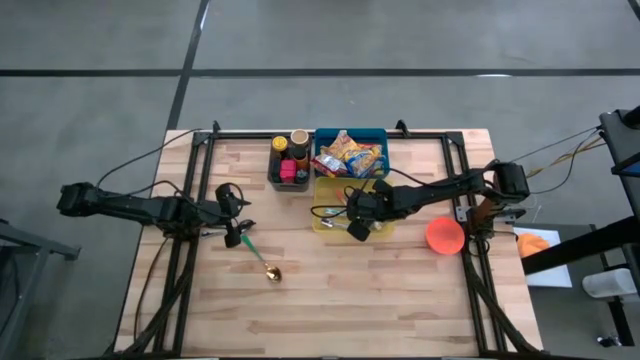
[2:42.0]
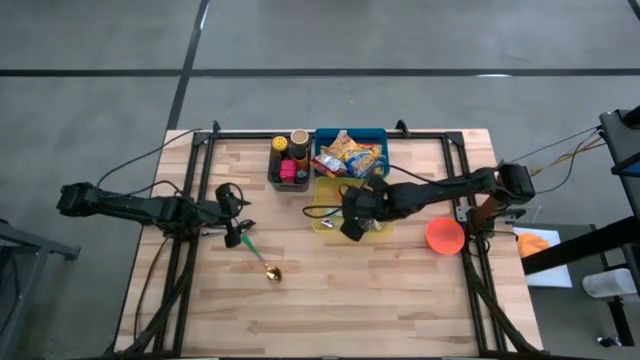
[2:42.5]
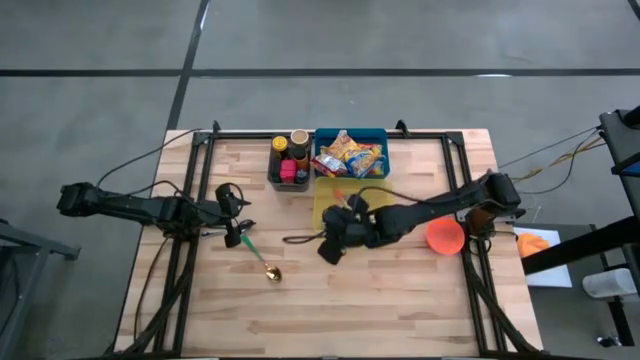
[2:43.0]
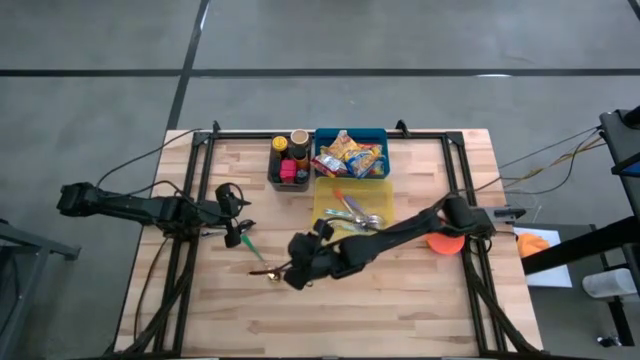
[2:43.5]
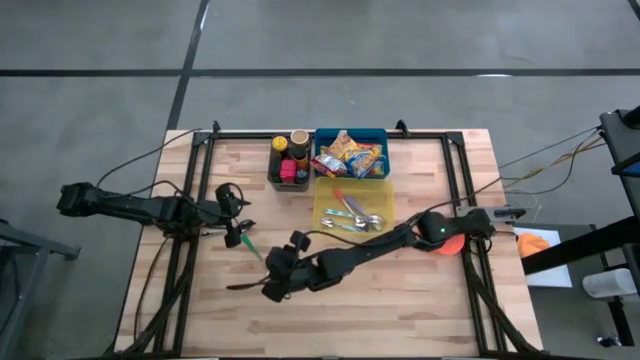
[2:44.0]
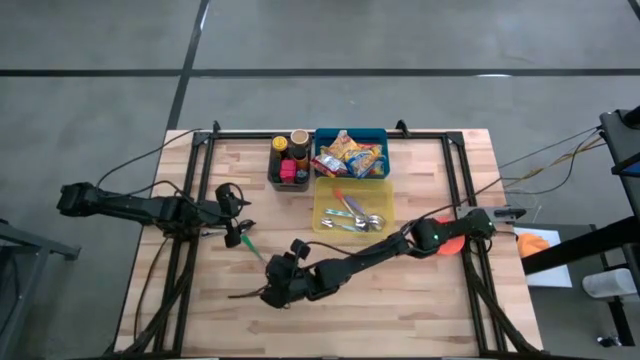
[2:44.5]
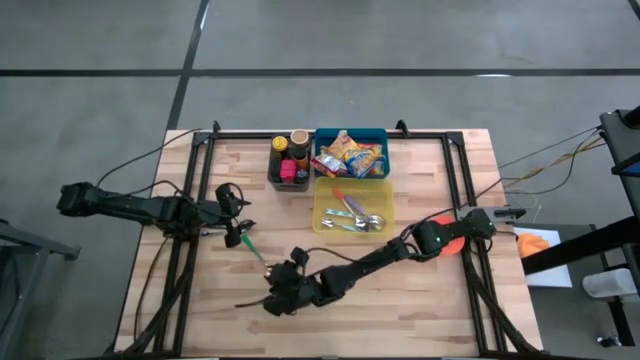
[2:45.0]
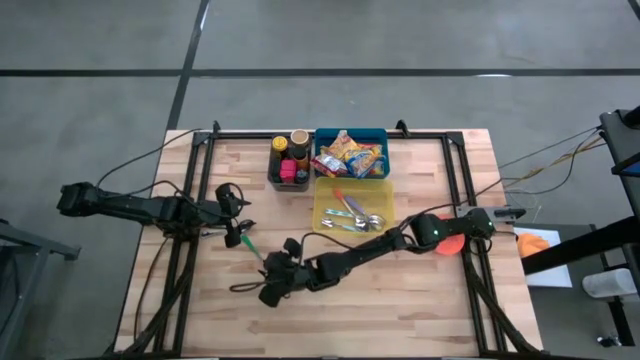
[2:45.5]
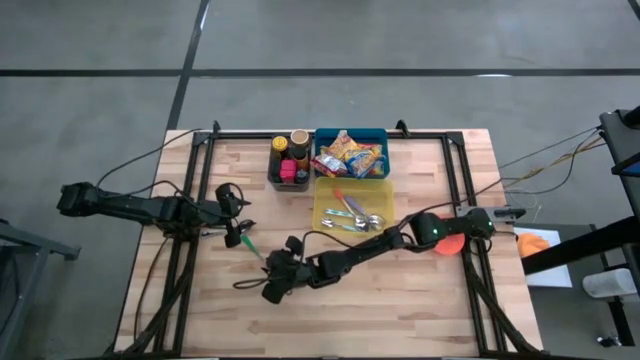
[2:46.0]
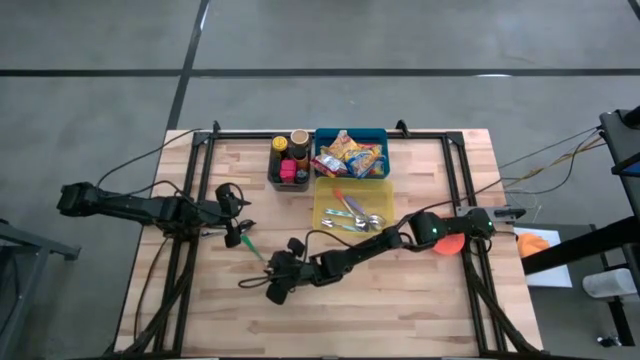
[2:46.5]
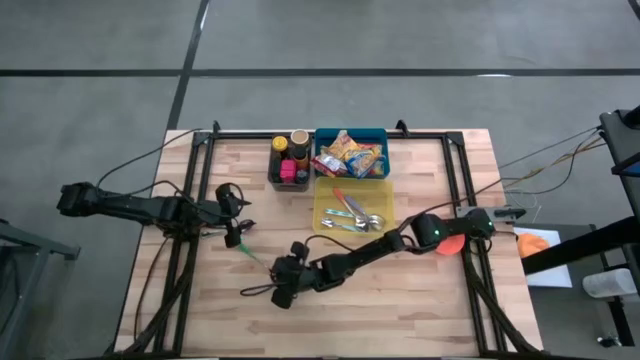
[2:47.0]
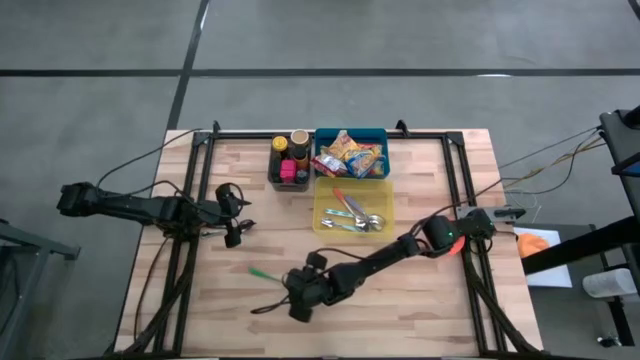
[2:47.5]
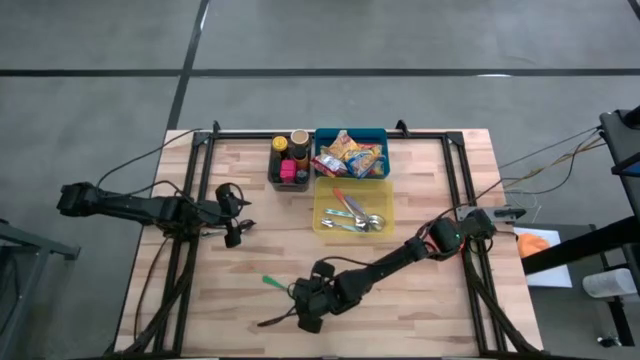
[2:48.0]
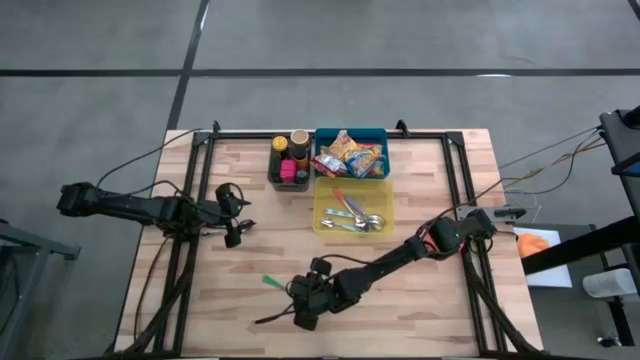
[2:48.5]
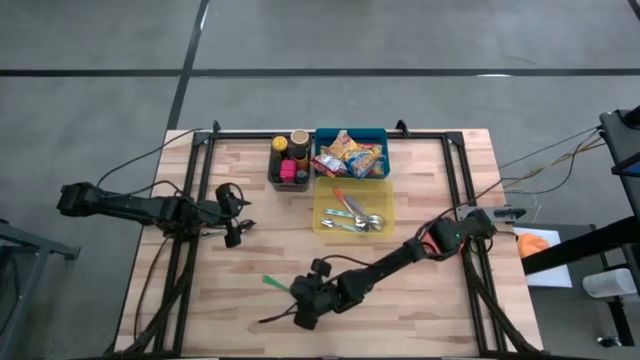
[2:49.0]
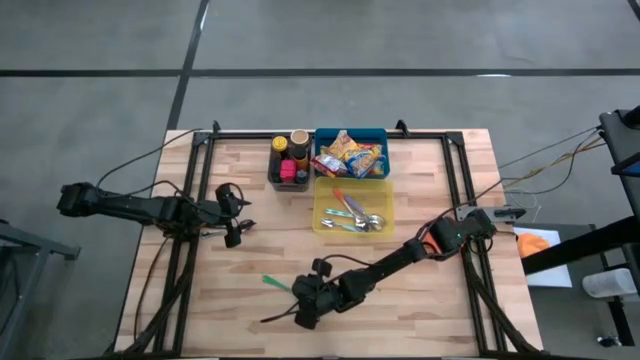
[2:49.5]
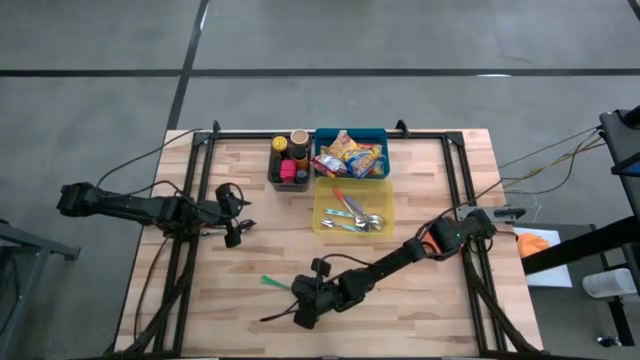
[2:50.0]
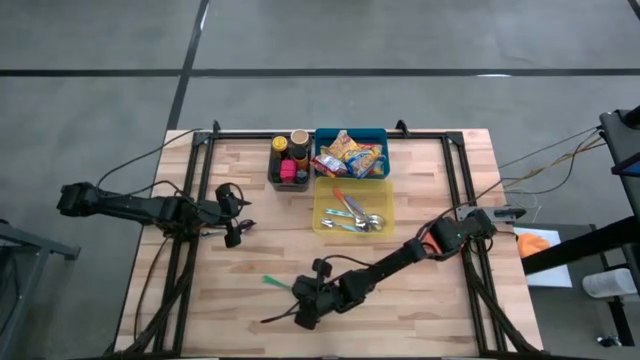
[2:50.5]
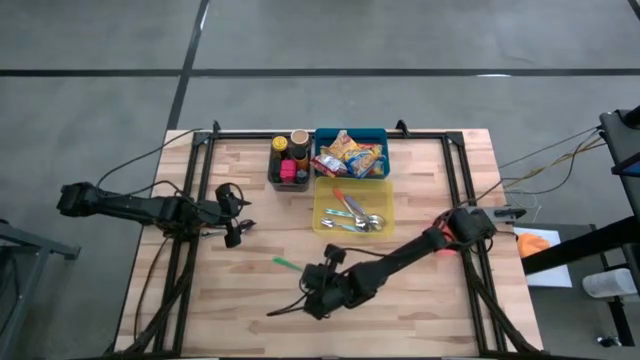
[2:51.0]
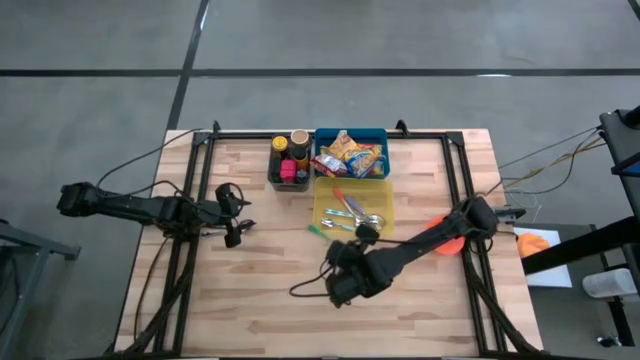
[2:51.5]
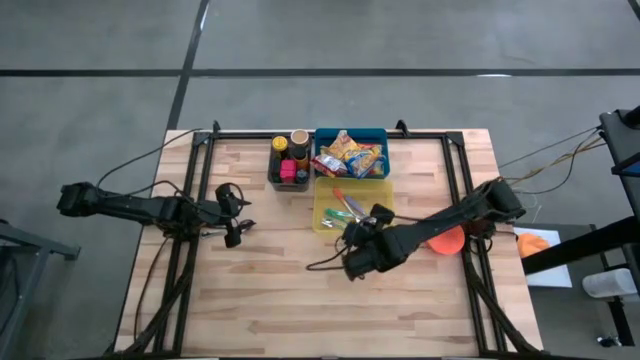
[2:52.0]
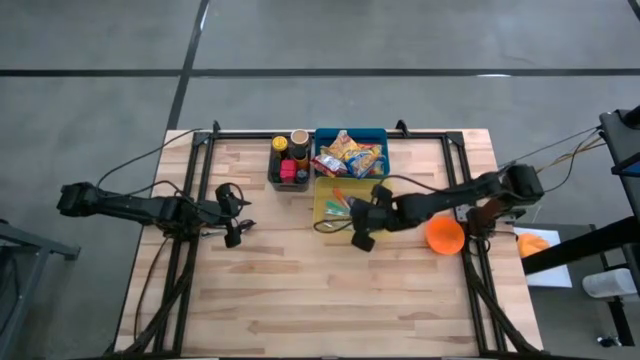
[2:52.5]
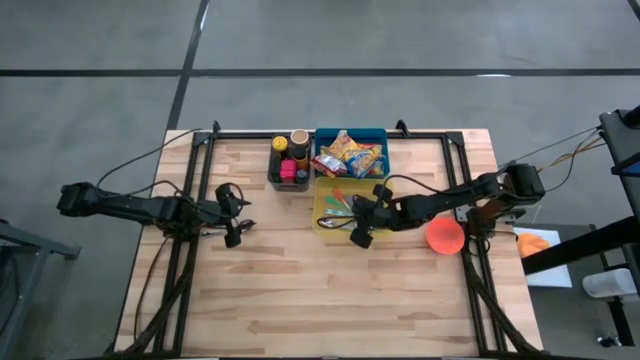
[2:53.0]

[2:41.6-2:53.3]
Put the green spoon into the yellow bin

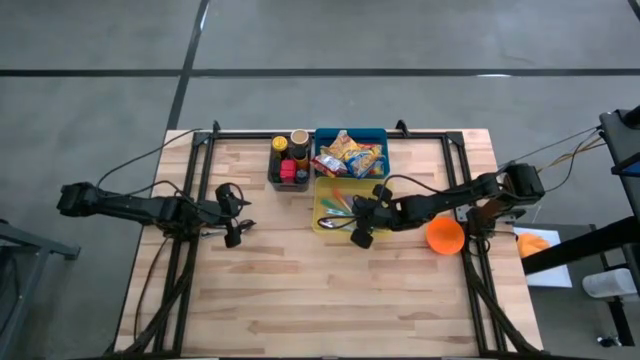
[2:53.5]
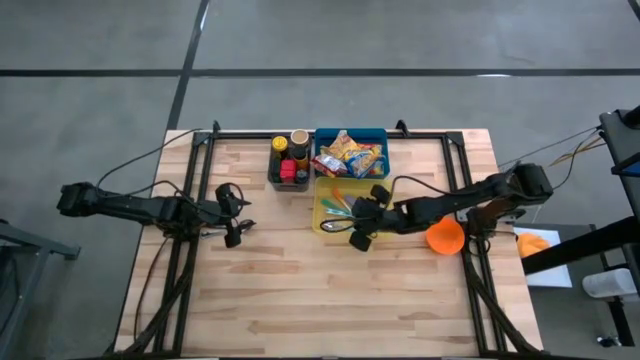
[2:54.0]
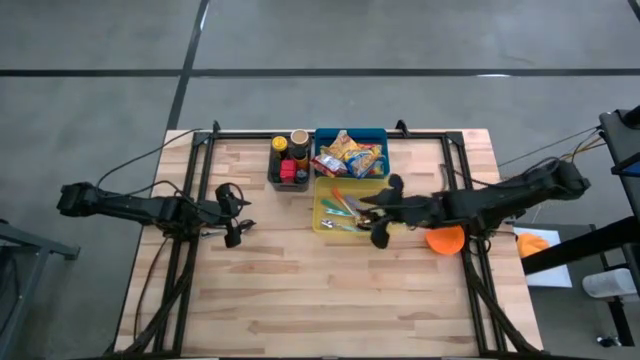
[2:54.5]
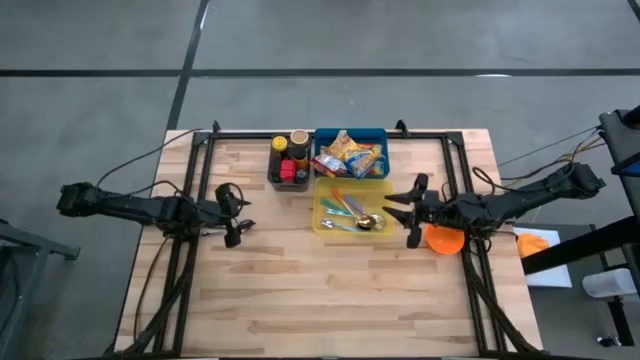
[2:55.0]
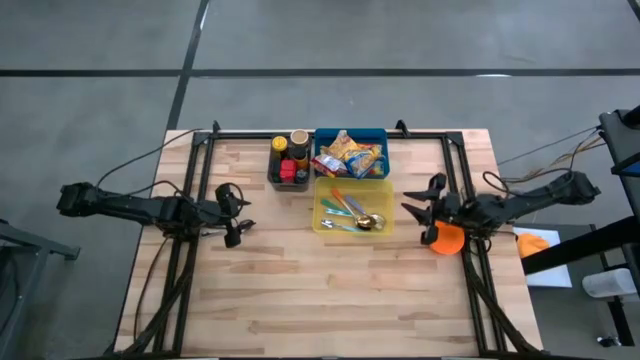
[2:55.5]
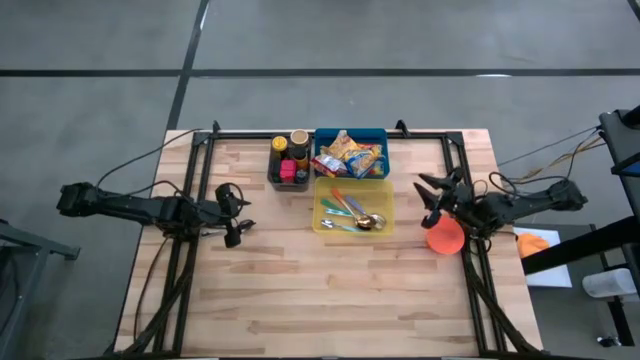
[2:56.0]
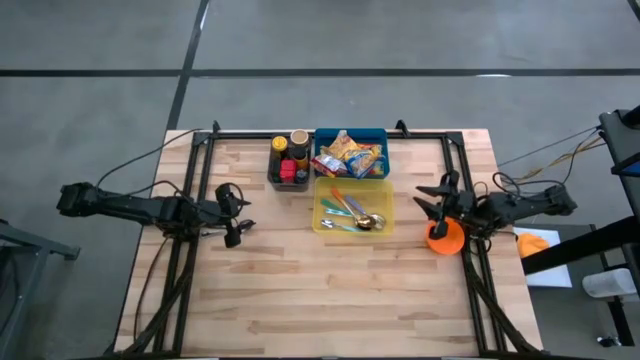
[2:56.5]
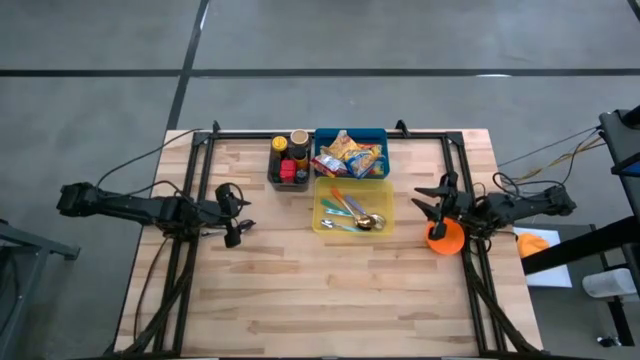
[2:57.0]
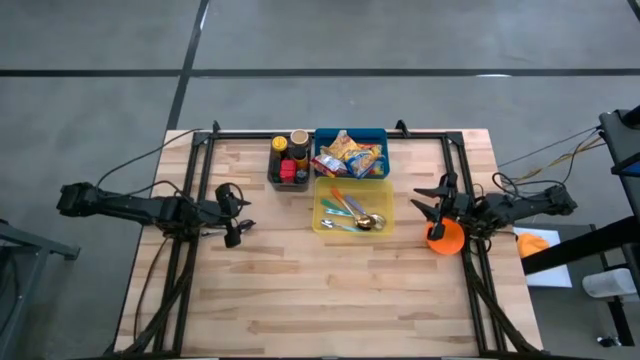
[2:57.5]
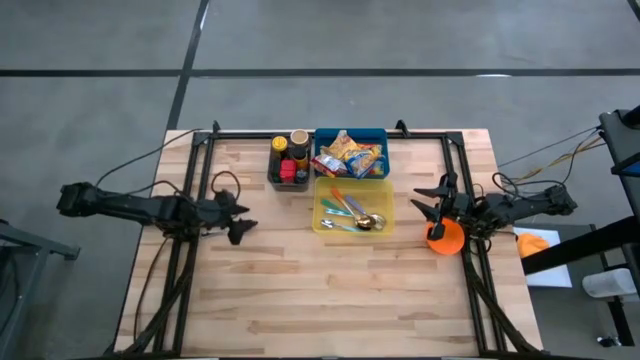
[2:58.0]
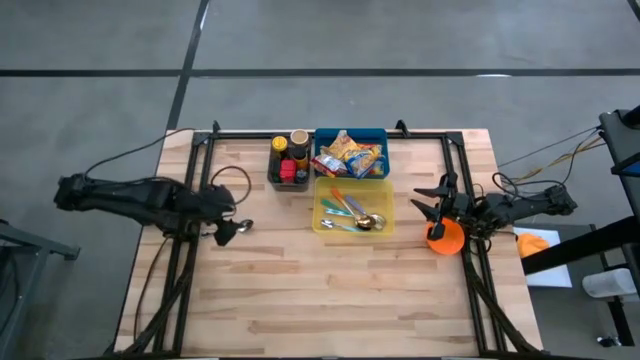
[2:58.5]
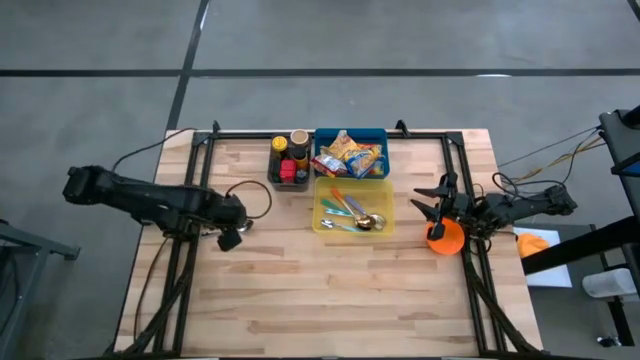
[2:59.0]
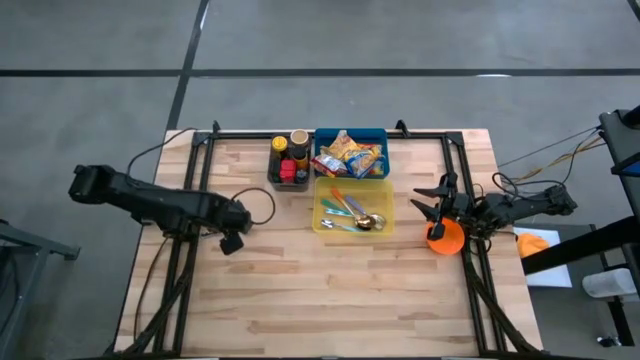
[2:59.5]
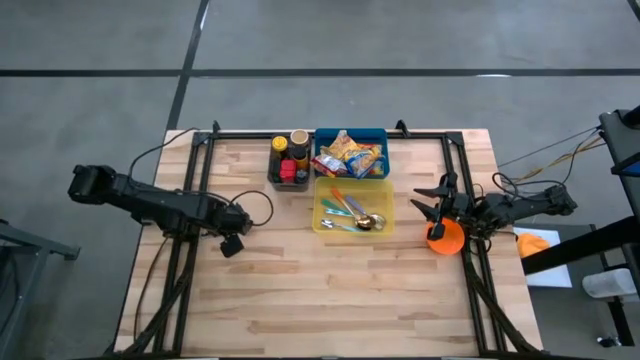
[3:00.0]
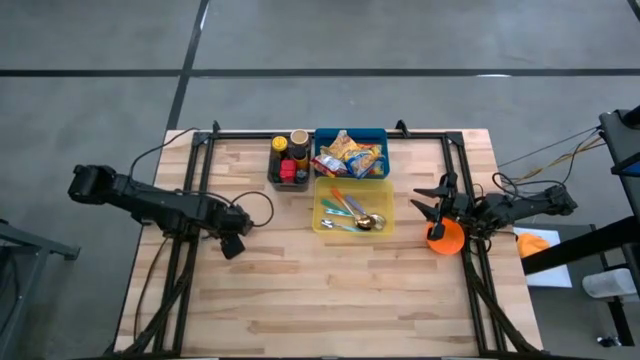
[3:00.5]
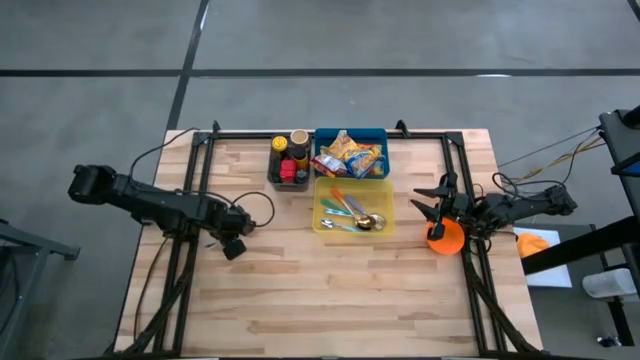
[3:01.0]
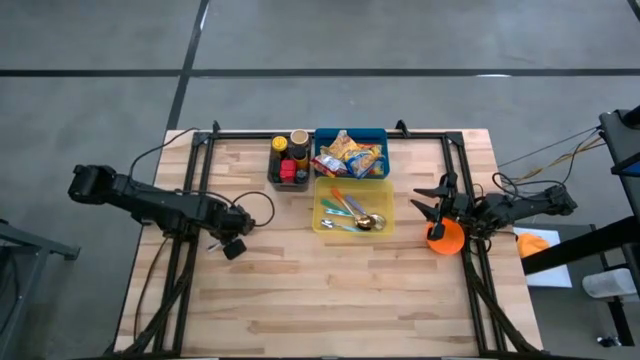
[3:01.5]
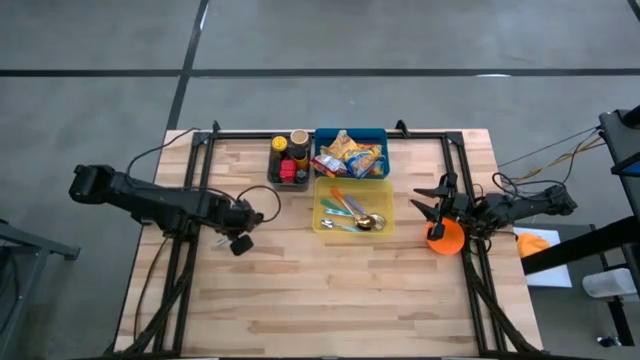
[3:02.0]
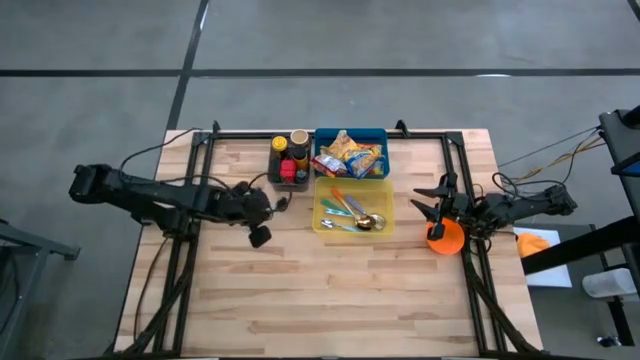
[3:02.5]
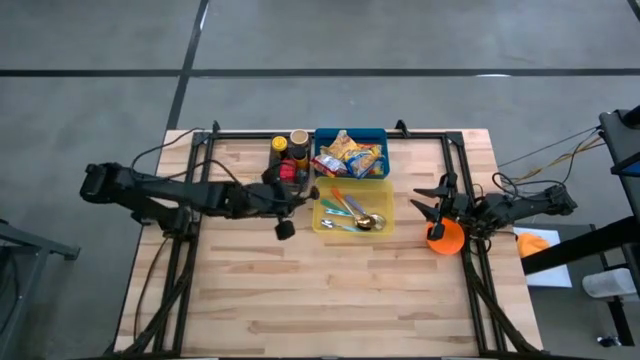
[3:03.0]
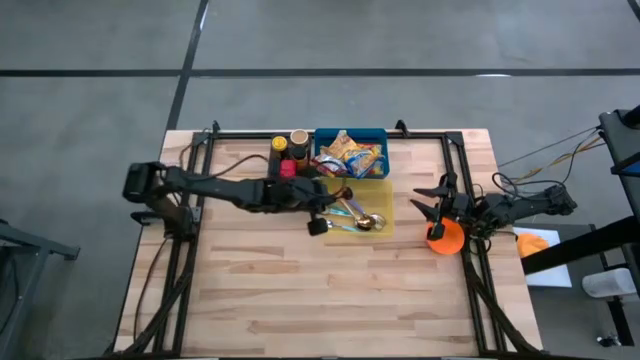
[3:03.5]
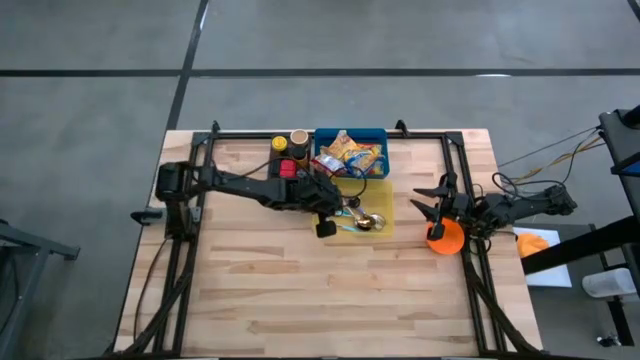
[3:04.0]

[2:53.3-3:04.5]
Put the silver spoon into the yellow bin
